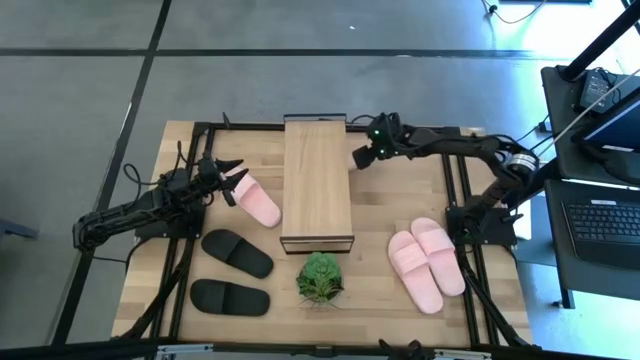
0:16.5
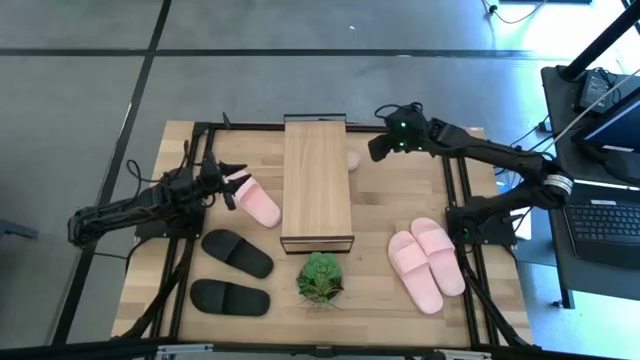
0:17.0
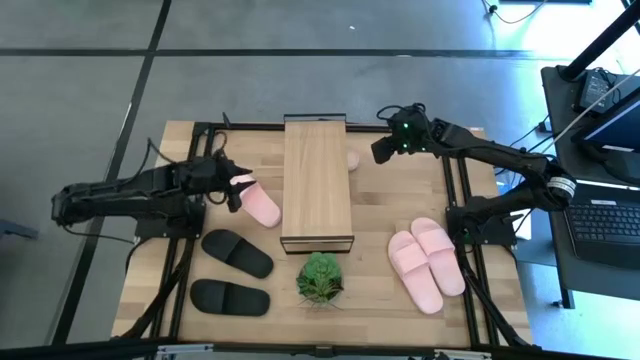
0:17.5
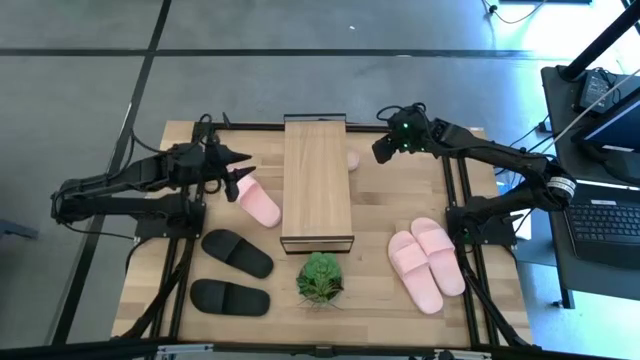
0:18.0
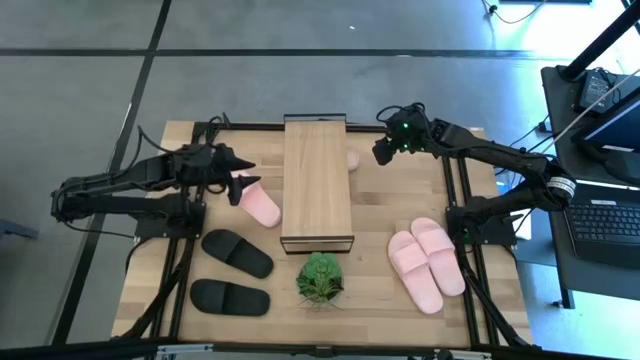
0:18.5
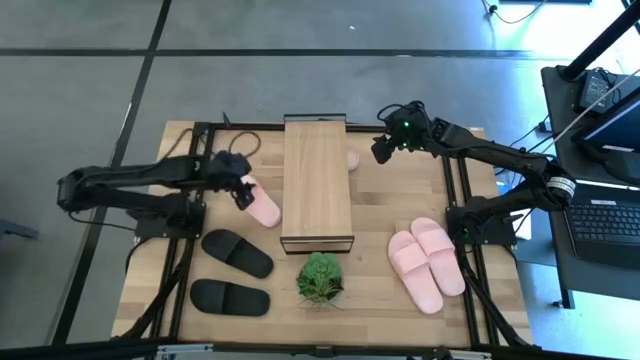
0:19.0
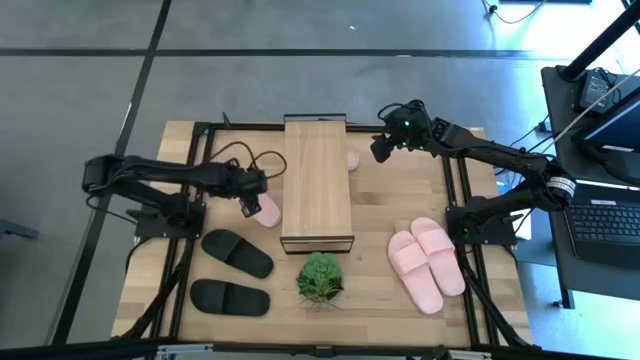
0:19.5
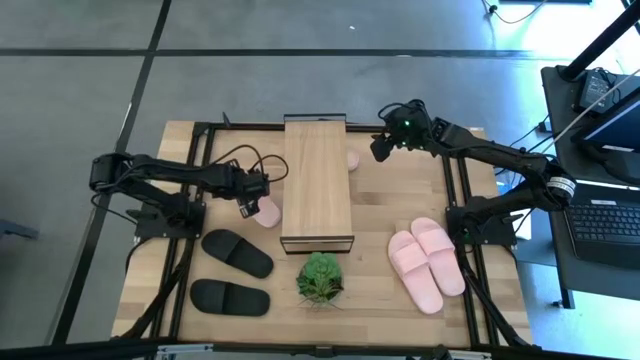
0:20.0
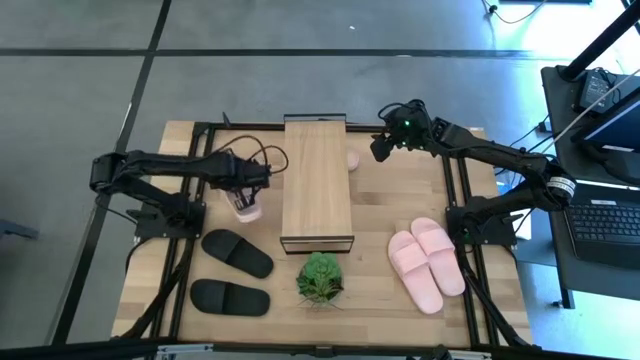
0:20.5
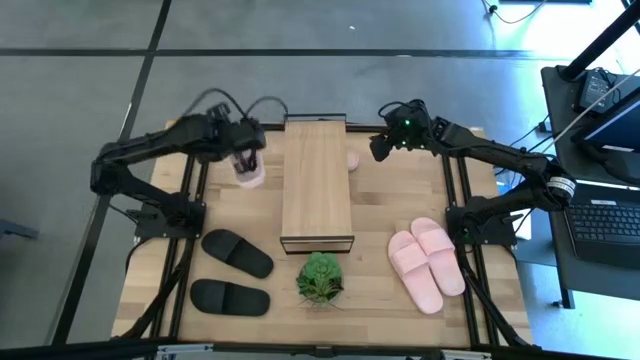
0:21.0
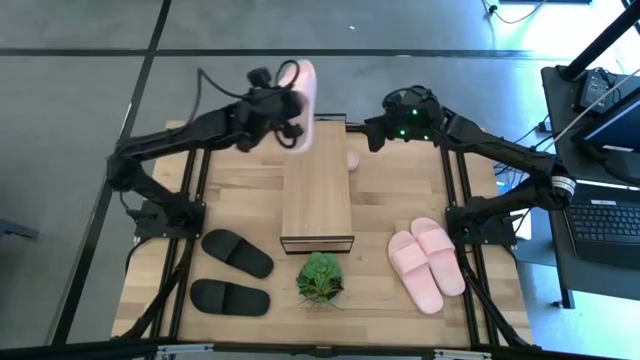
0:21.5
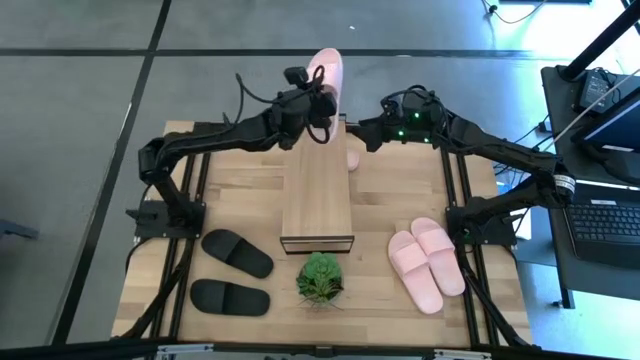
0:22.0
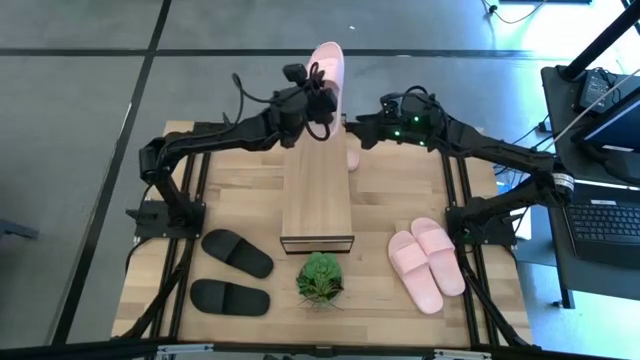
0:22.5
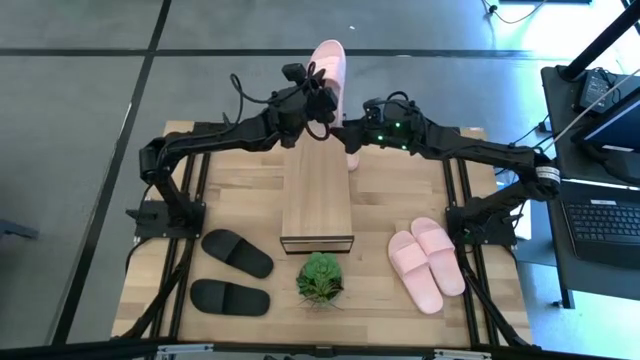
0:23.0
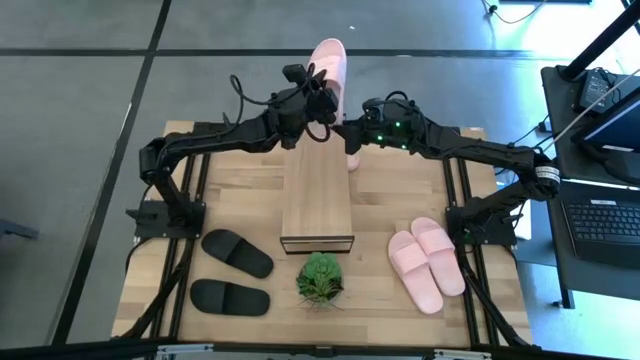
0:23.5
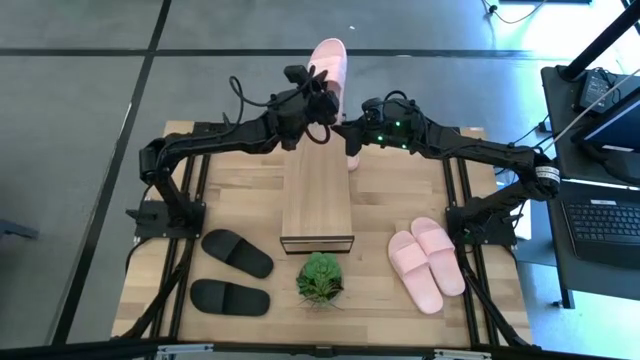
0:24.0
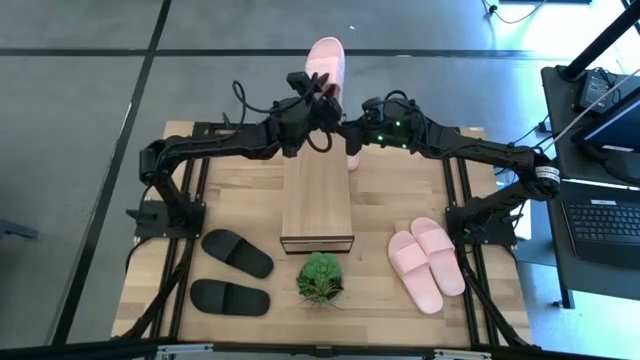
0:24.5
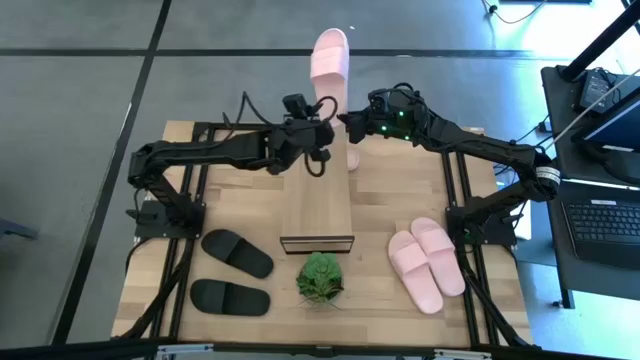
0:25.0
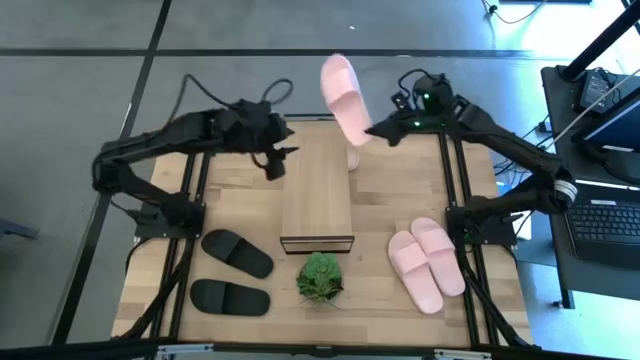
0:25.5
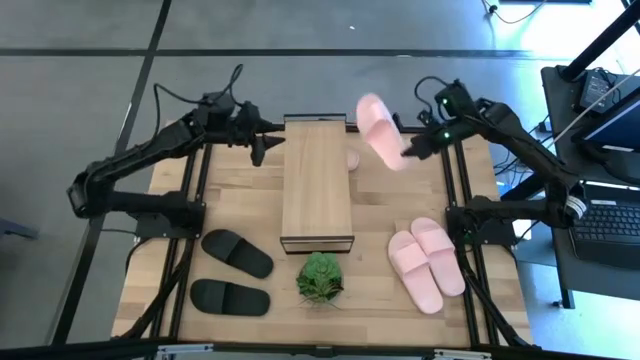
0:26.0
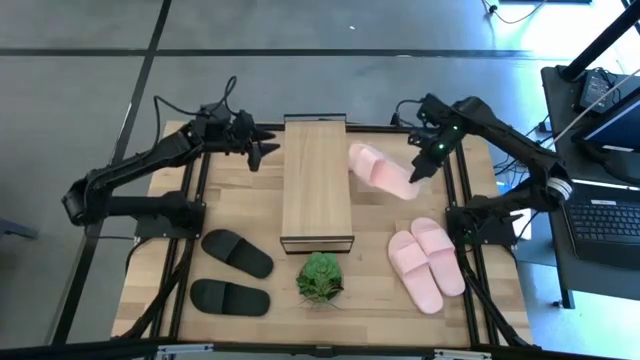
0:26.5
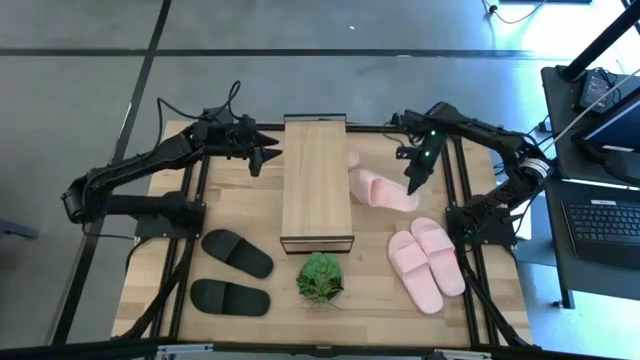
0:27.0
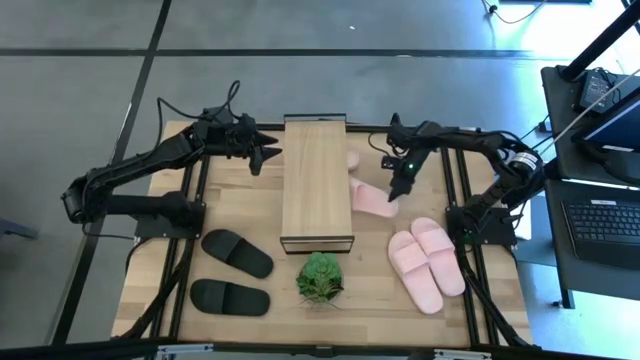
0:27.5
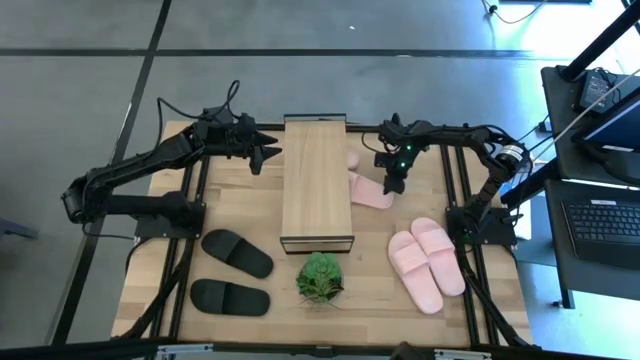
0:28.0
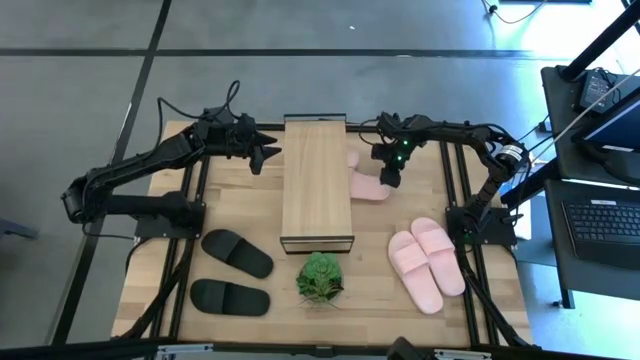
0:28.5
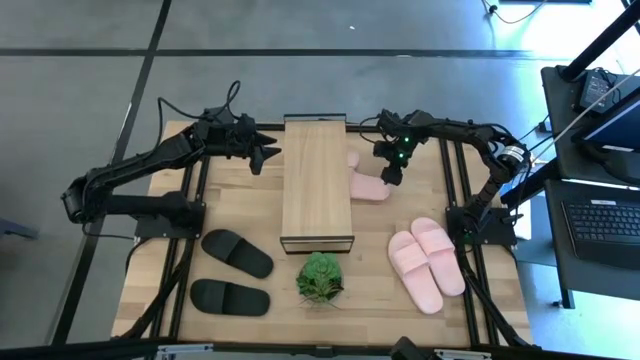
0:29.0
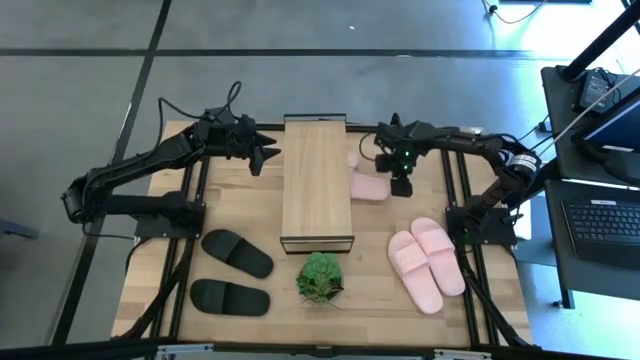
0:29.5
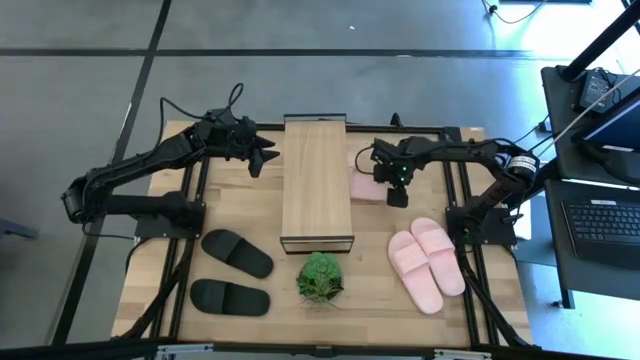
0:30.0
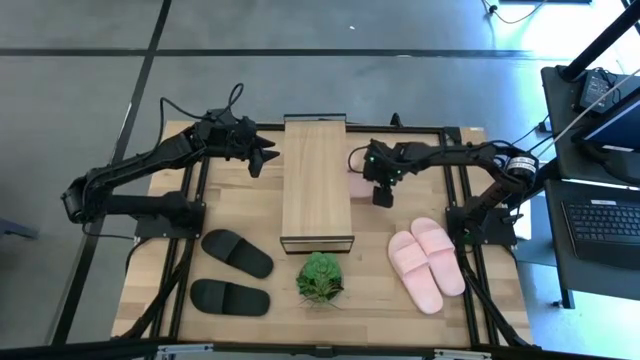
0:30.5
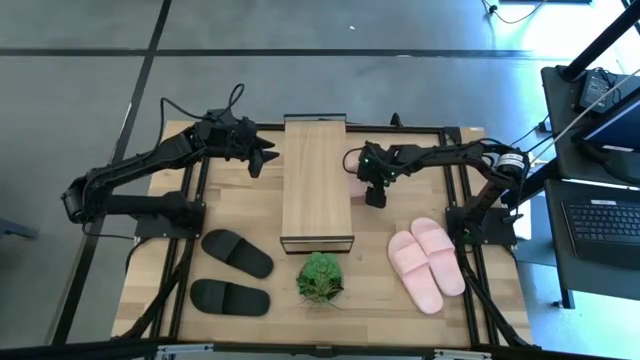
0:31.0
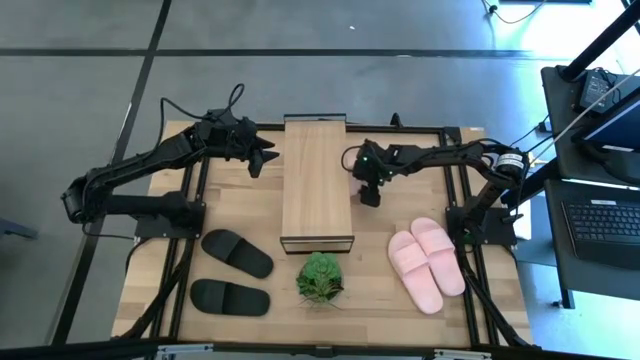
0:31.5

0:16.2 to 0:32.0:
Task: Pick and place slides into the shelf
Put the pink slipper under the shelf
